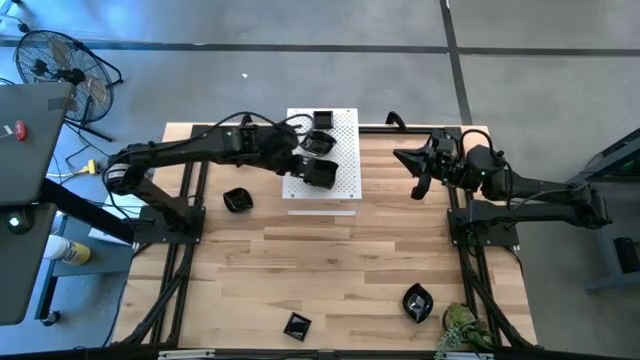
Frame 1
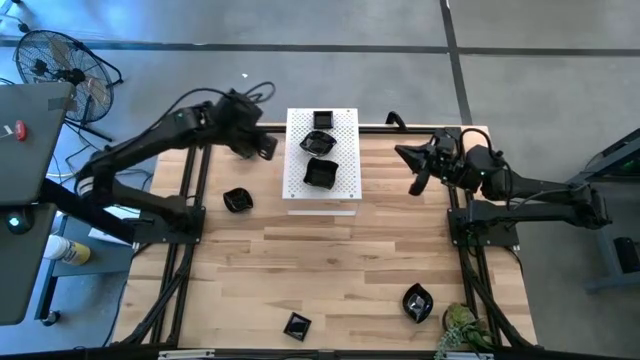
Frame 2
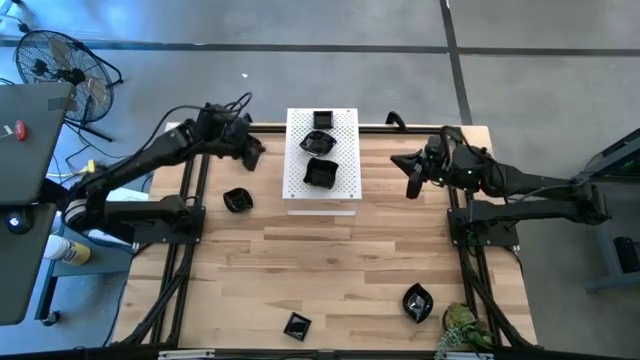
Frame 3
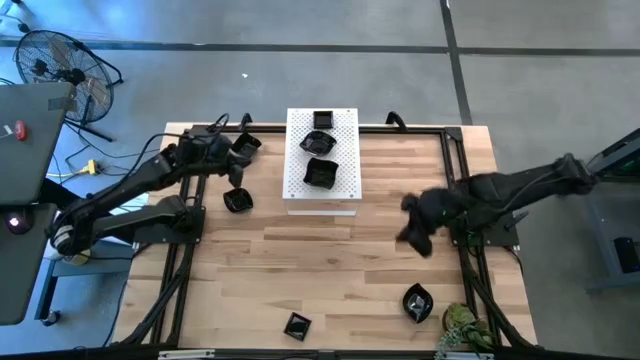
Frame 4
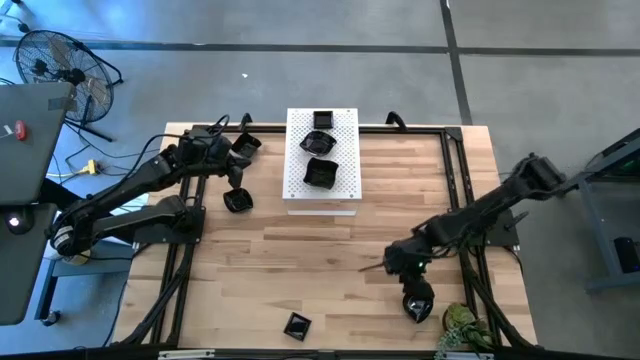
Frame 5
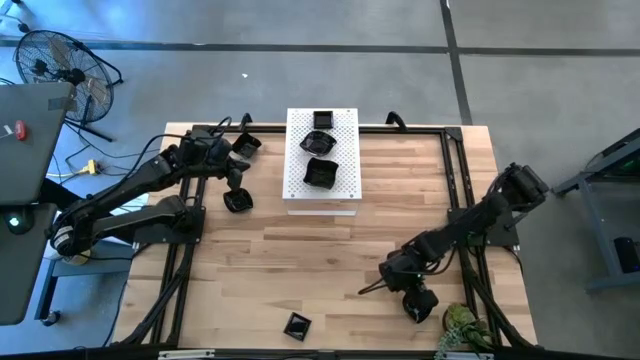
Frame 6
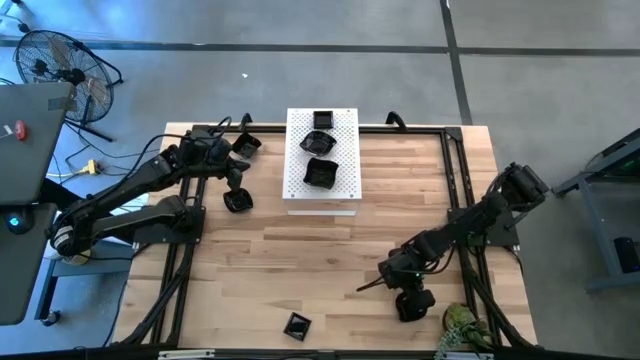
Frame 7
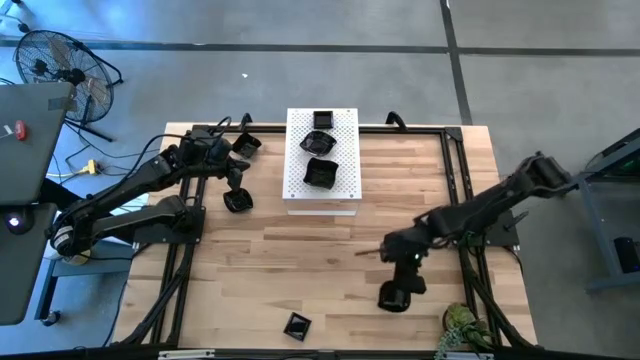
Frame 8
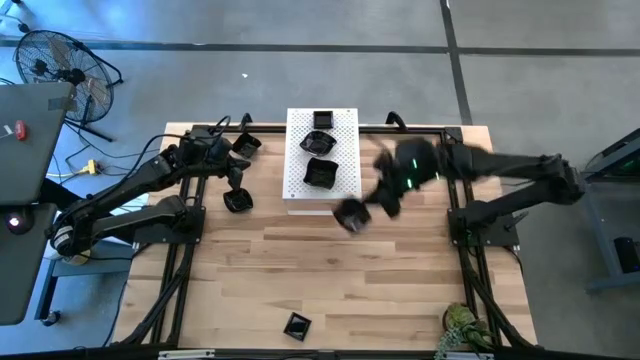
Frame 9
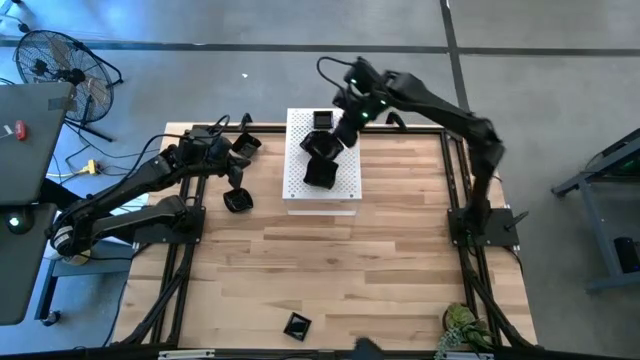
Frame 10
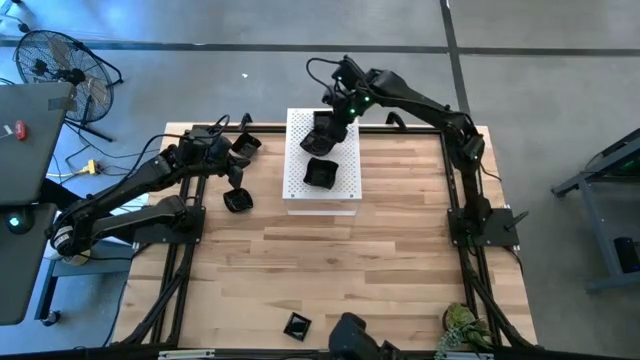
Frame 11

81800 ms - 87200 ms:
Task: Pick & Place Mini shaped plates
Stack the black leaf shaped plate on top of the black leaf shaped plate on the shelf

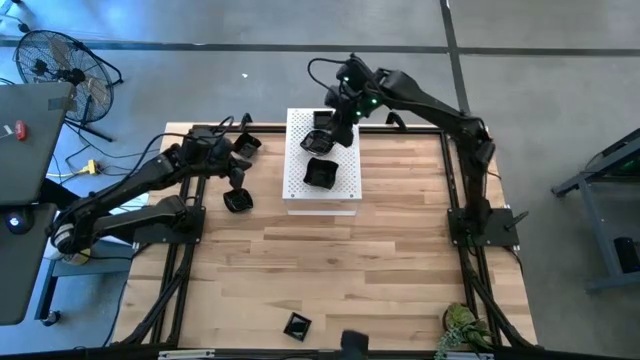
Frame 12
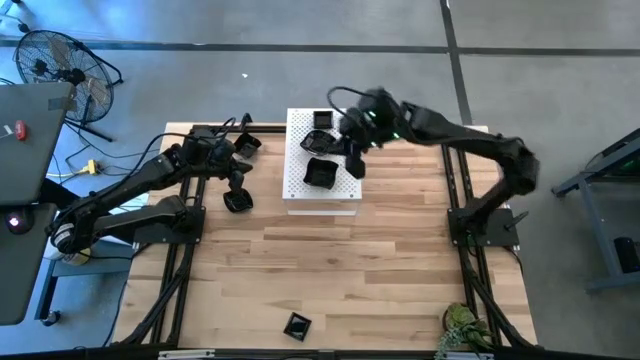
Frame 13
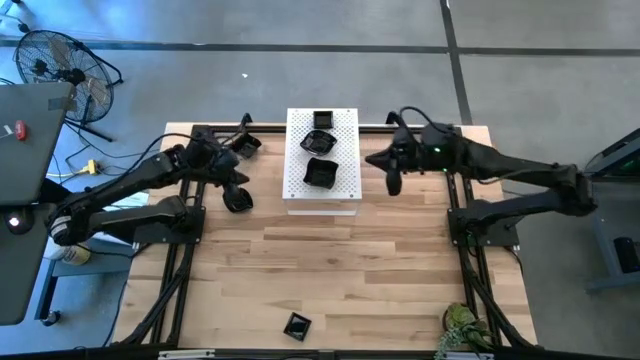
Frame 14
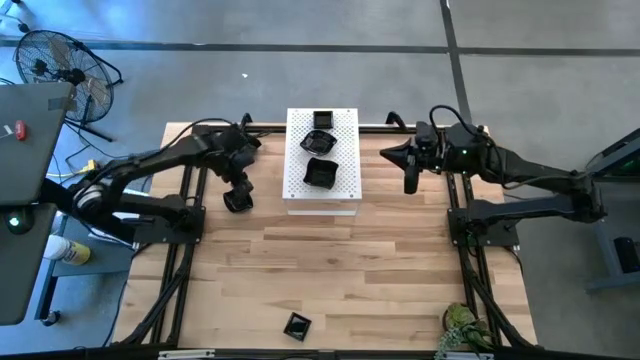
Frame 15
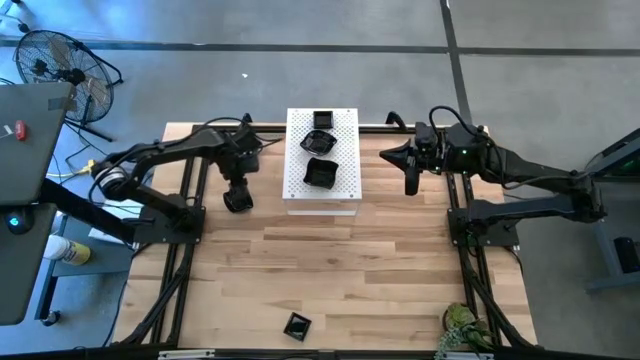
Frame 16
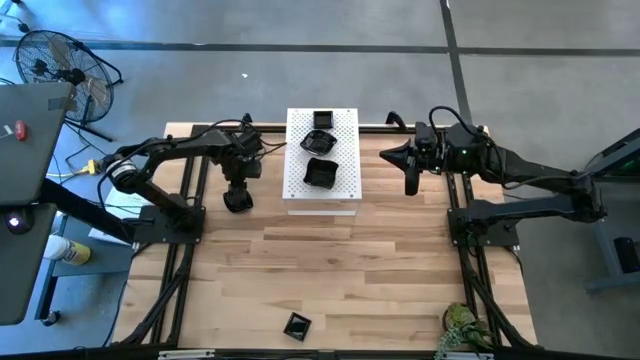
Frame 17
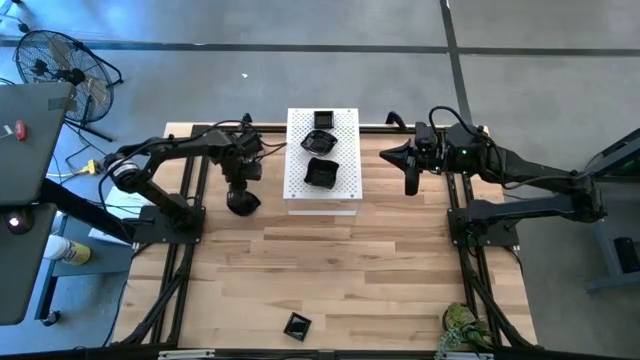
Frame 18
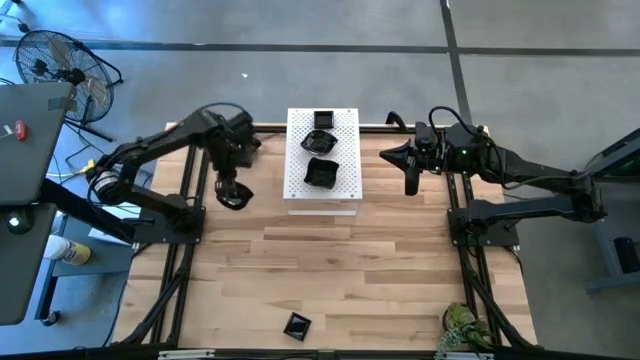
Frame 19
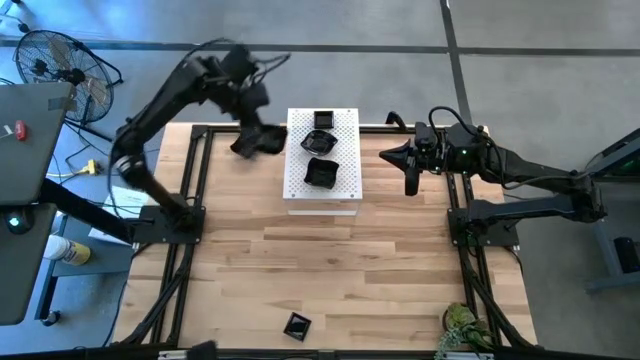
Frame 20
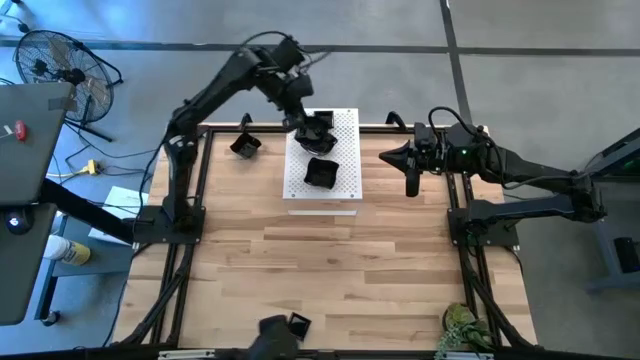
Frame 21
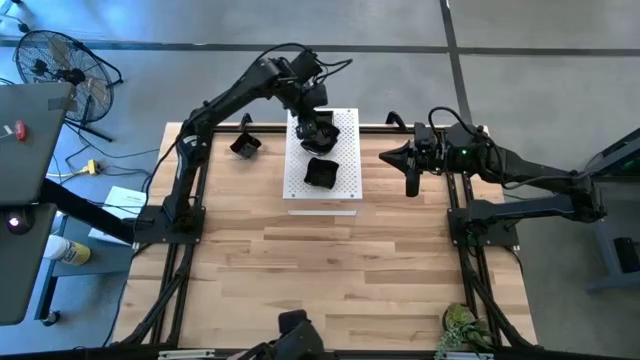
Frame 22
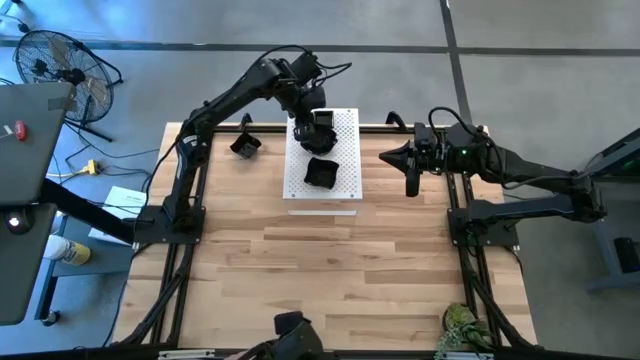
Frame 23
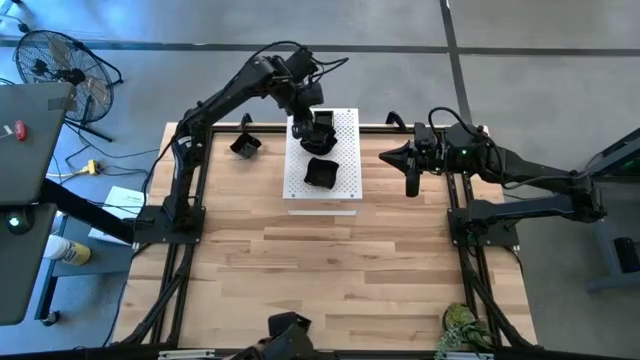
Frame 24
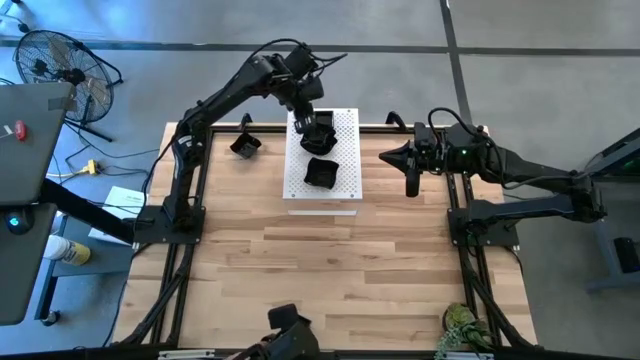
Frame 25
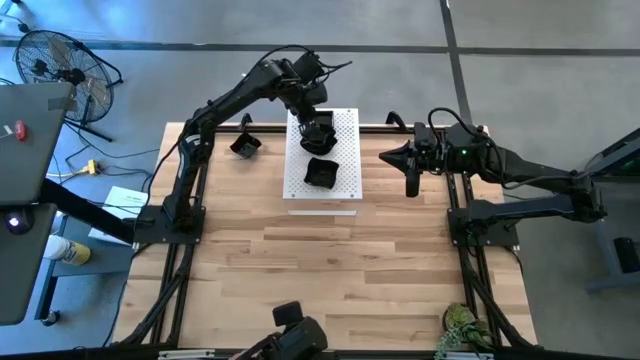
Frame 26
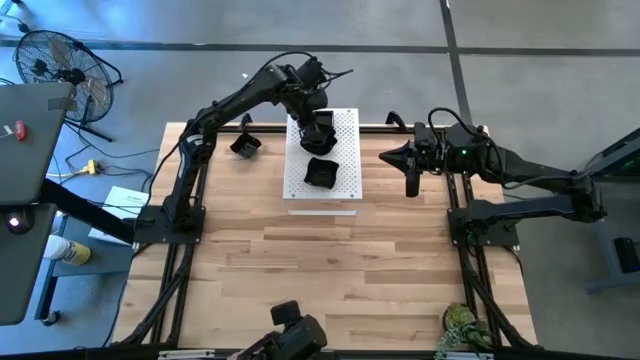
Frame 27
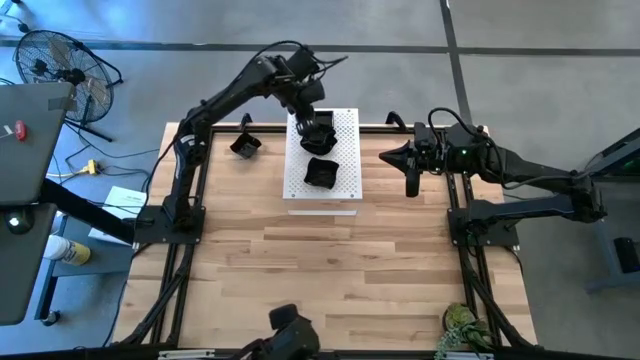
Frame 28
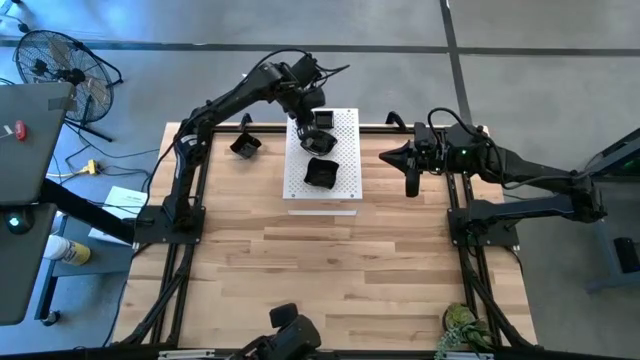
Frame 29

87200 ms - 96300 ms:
Stack the black leaf shaped plate on top of the black leaf shaped plate on the shelf

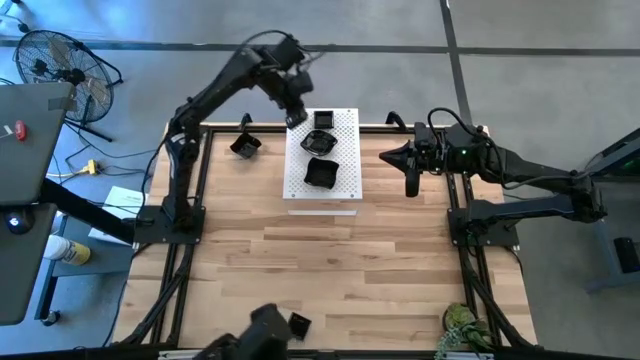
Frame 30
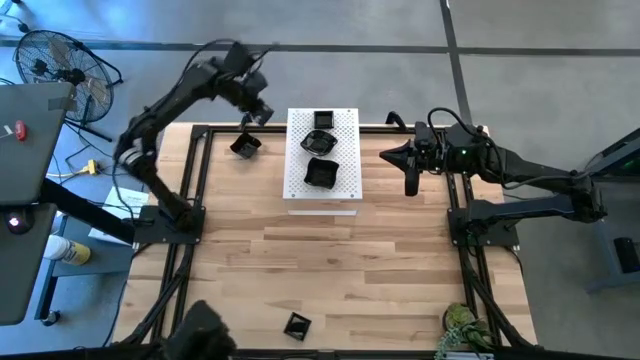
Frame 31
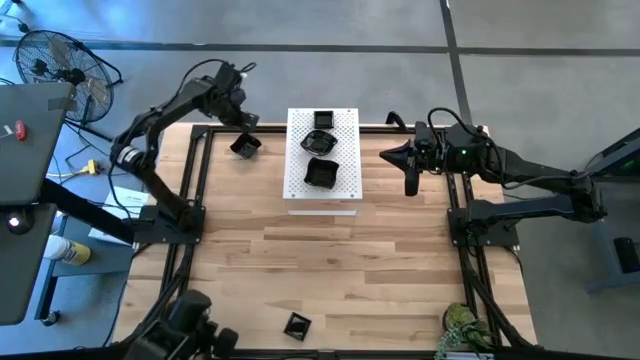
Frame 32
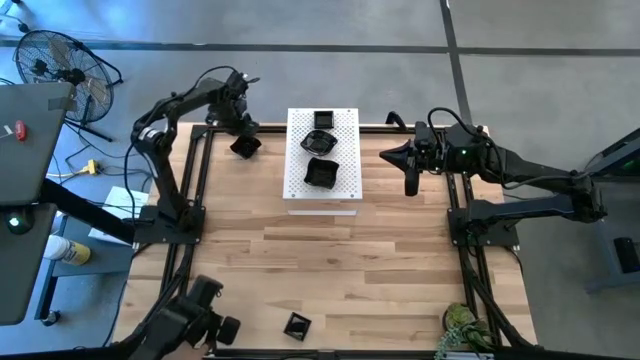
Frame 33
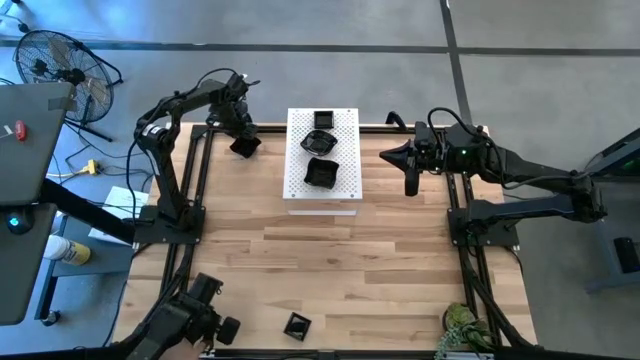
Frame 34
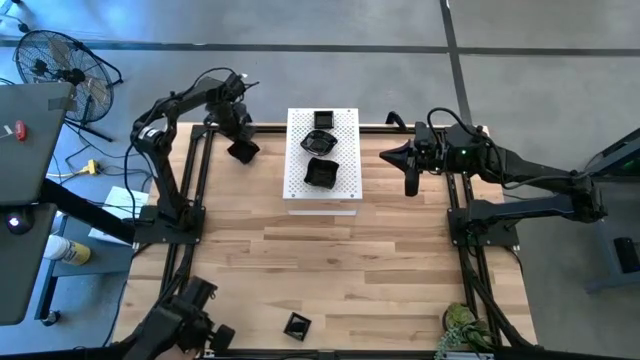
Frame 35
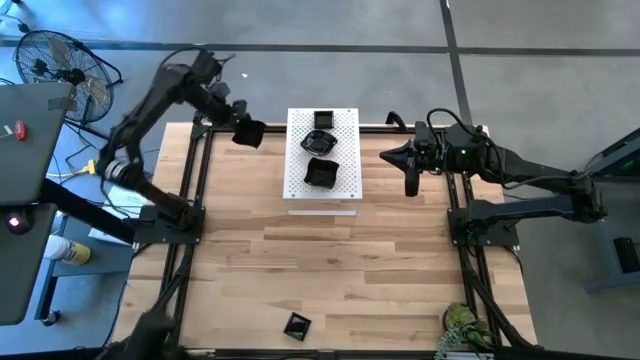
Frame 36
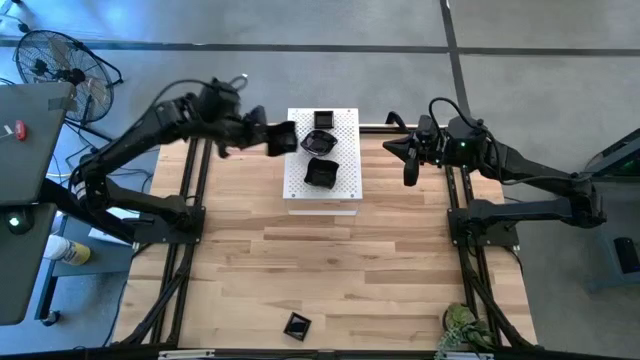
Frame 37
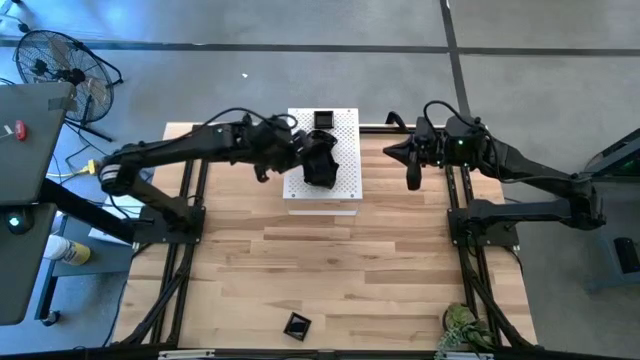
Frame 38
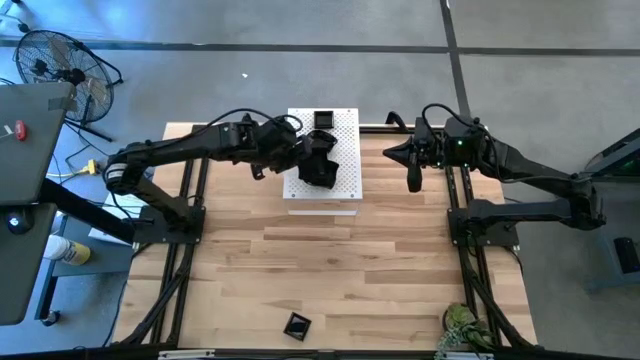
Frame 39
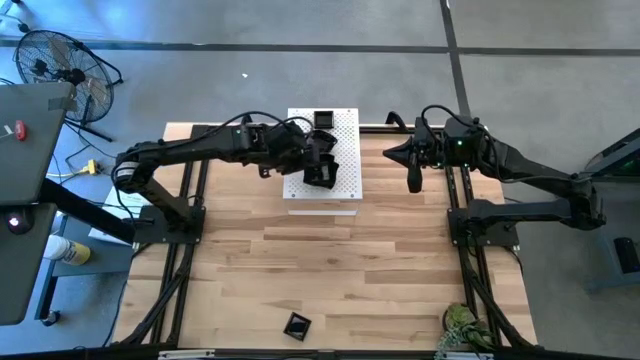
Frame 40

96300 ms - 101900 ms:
Stack the distorted square plate on top of the distorted square plate on the shelf
